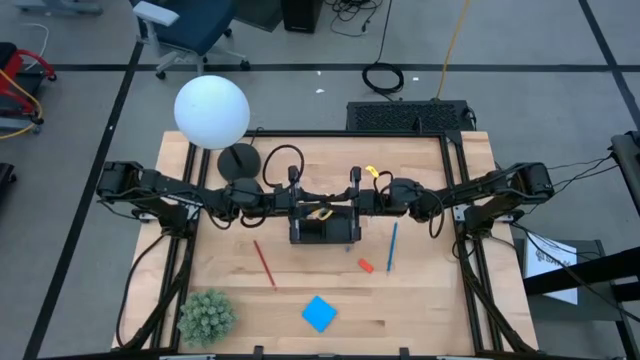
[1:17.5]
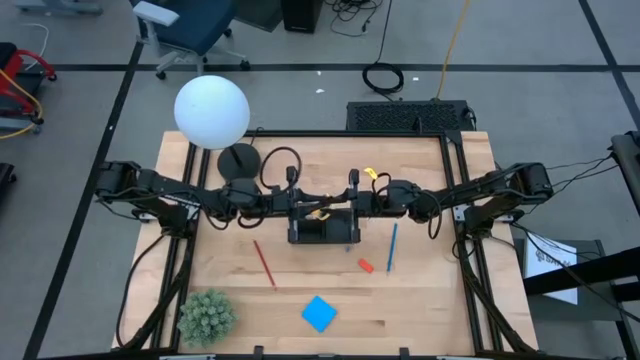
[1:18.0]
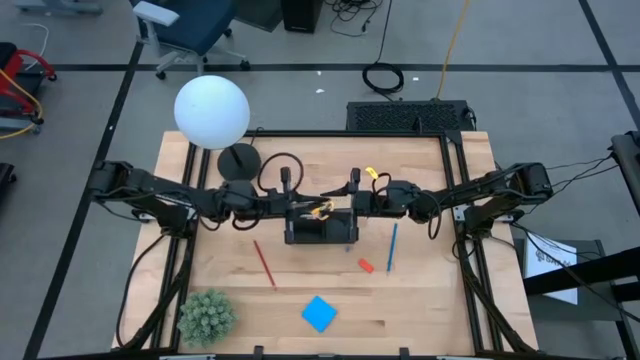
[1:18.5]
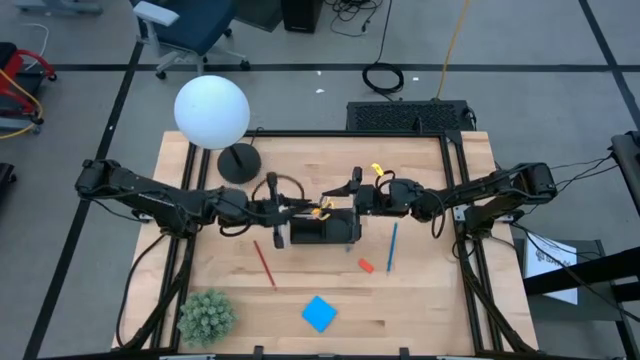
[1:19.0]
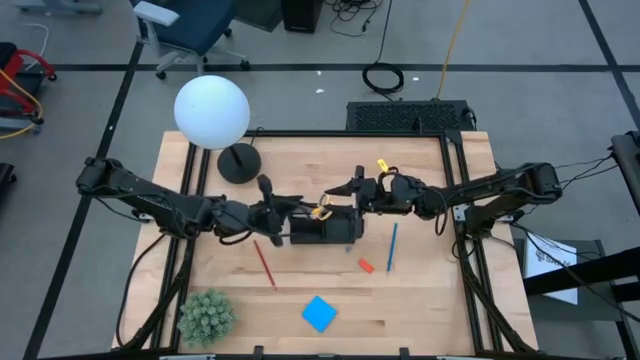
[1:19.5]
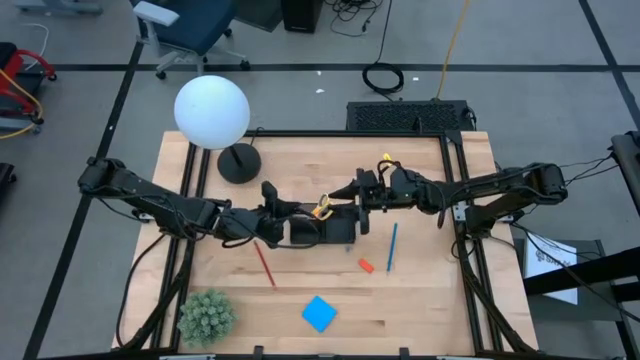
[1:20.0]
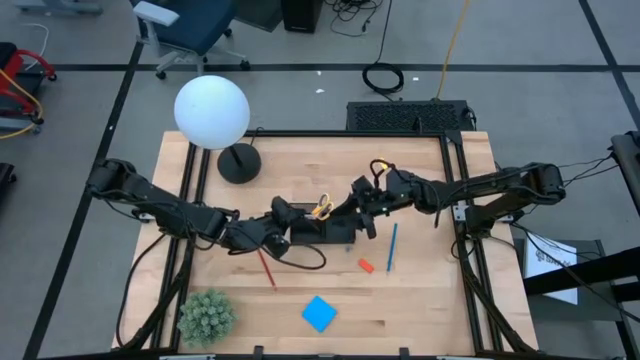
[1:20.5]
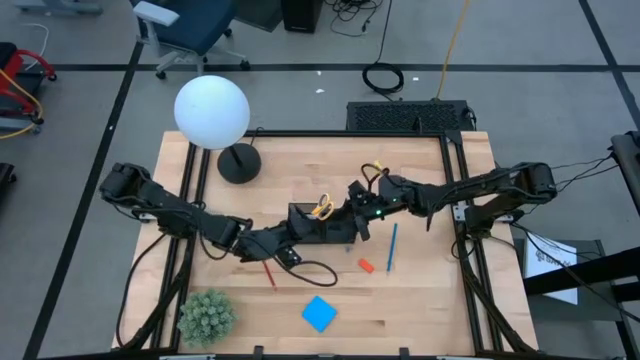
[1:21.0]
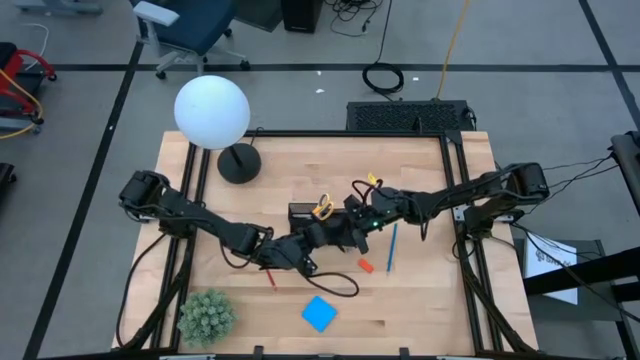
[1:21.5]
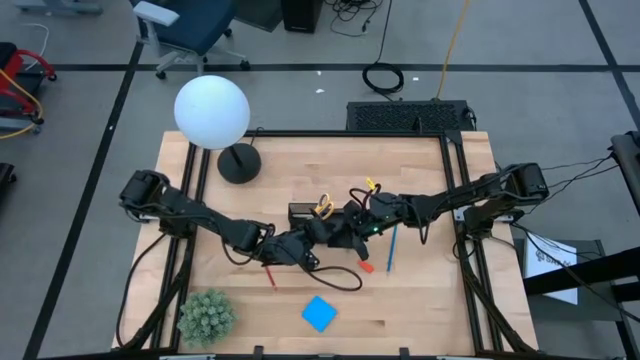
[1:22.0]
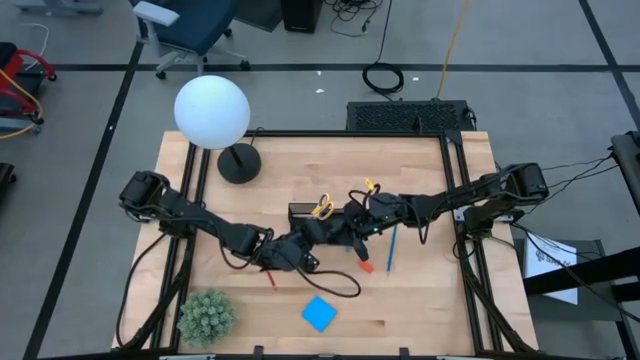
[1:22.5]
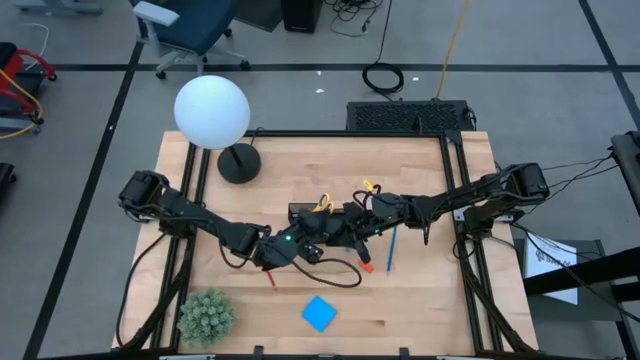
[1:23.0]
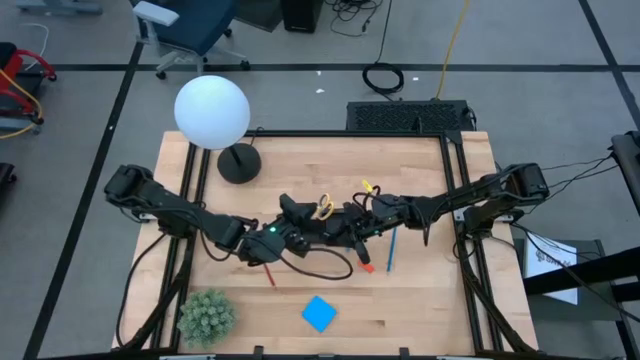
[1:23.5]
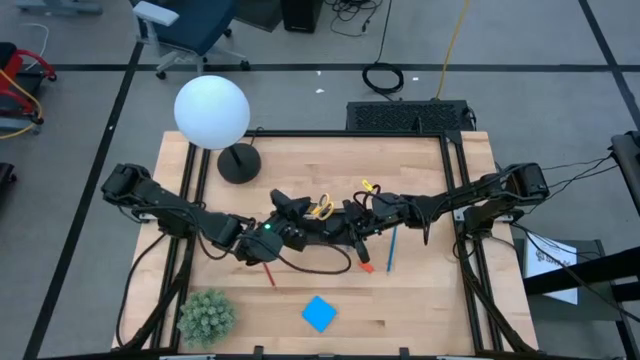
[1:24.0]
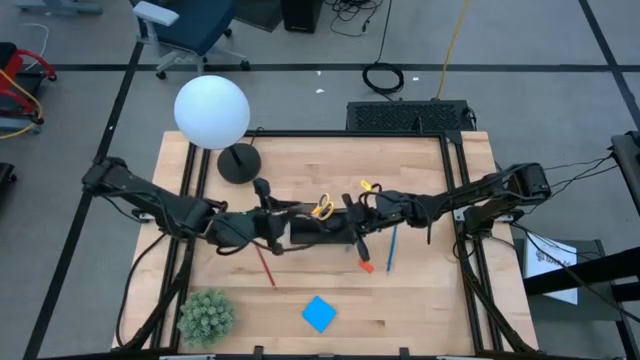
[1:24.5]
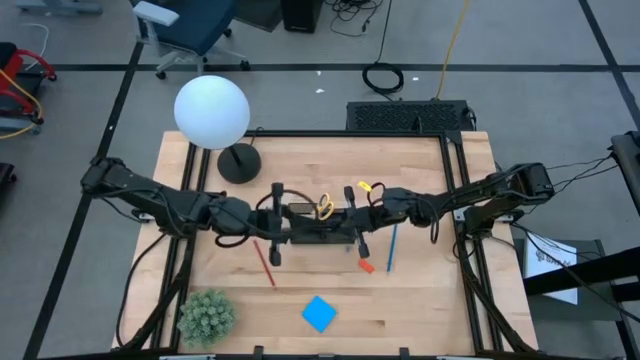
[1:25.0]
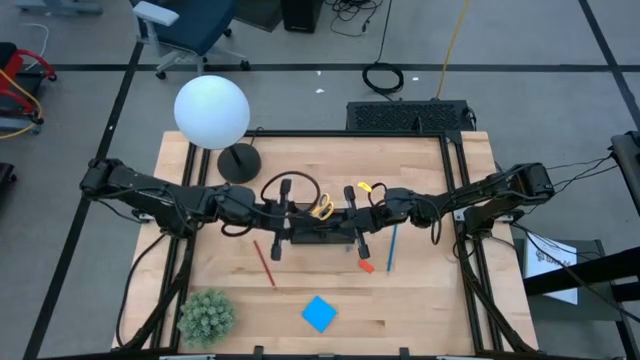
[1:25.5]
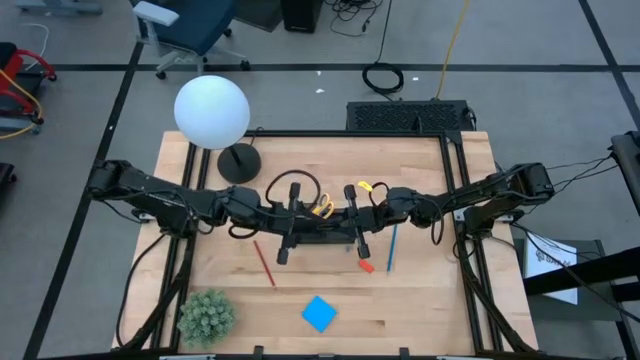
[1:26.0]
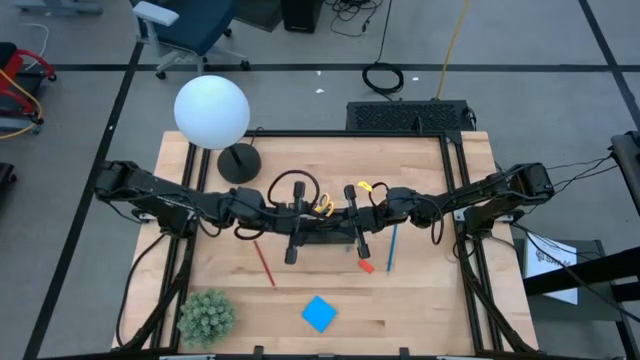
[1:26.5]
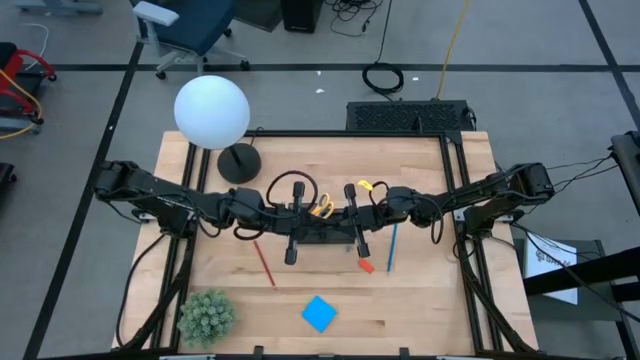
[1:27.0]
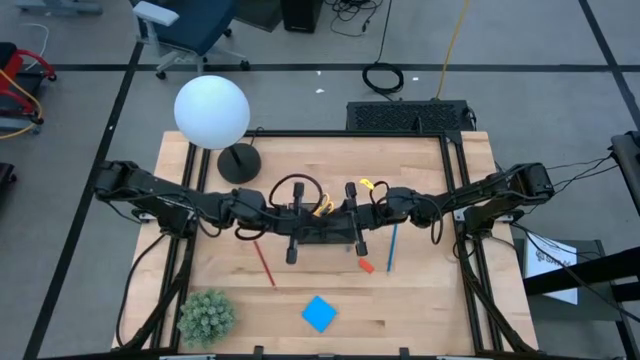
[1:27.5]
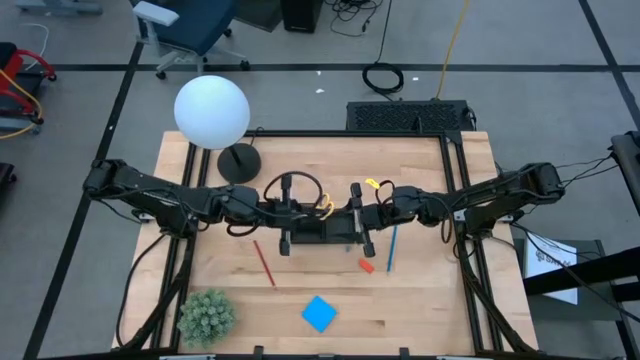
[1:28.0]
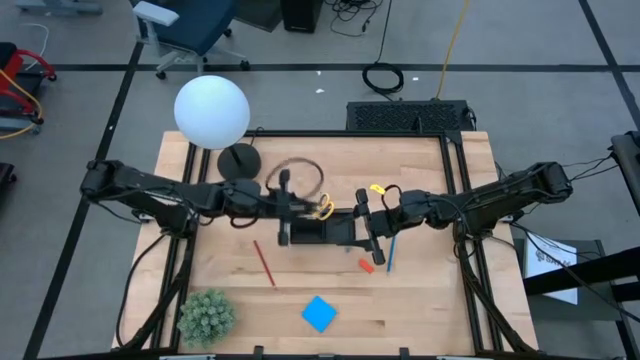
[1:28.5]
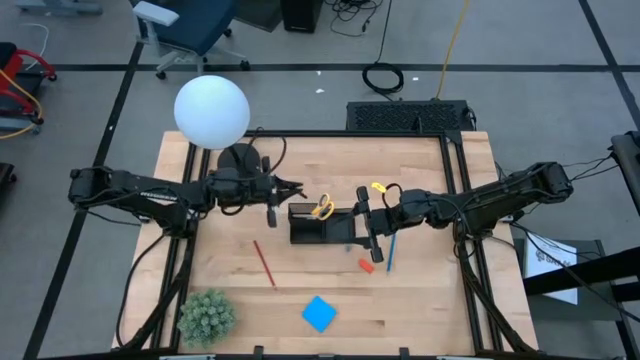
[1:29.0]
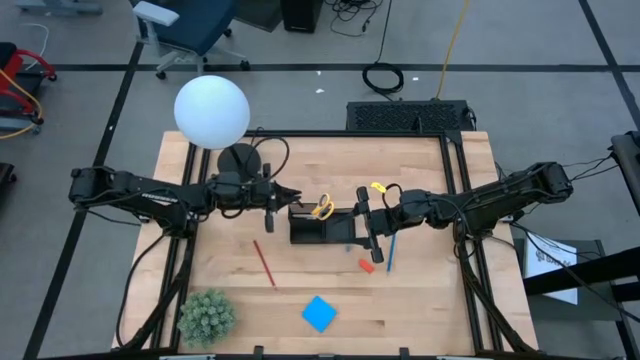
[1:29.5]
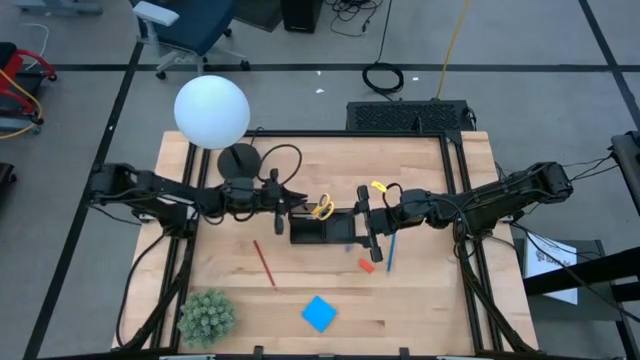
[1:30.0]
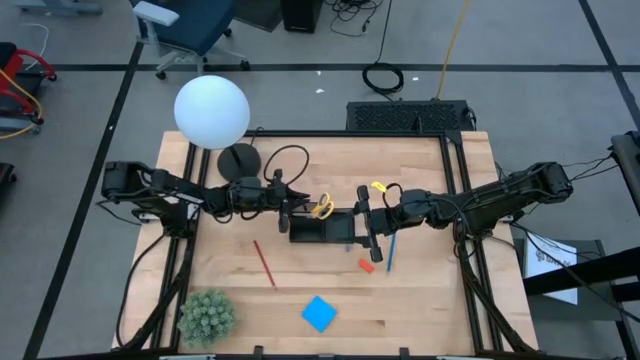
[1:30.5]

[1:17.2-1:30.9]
Task: Pick and place office supplies into organizer
Put the black pen into the desk organizer
